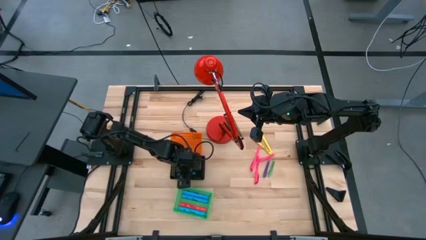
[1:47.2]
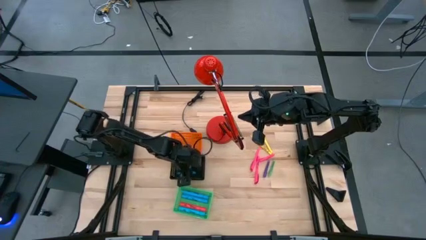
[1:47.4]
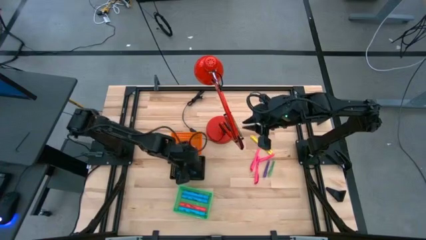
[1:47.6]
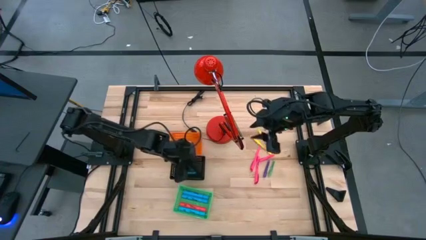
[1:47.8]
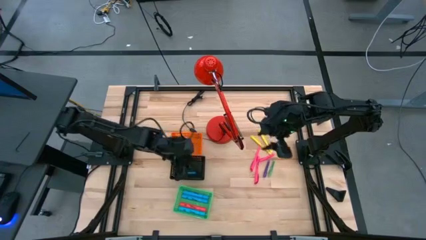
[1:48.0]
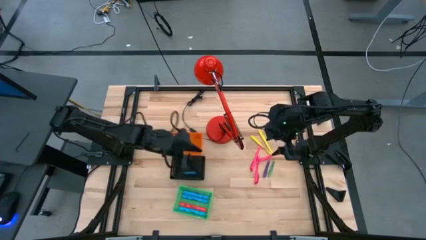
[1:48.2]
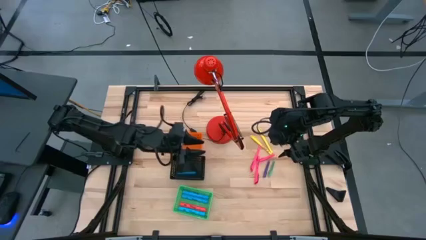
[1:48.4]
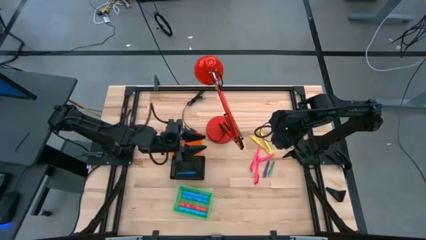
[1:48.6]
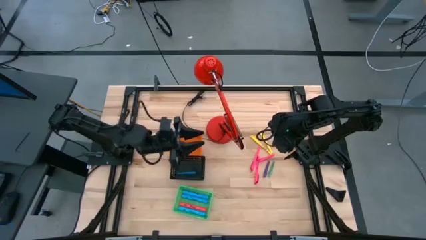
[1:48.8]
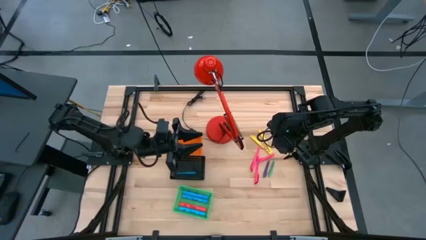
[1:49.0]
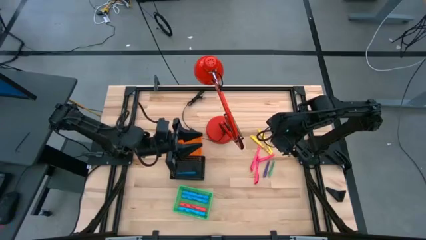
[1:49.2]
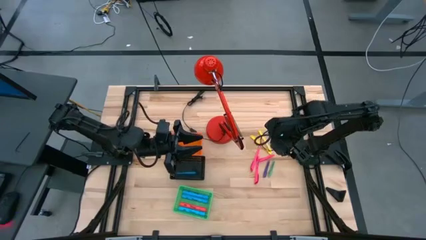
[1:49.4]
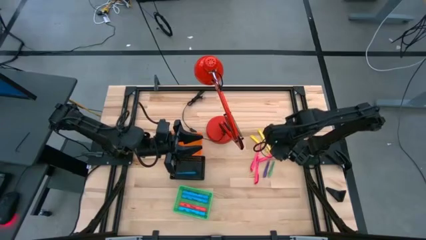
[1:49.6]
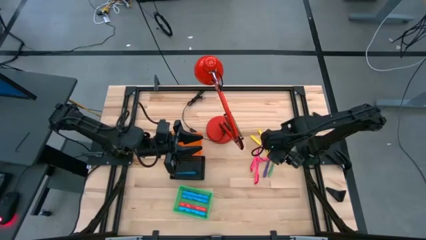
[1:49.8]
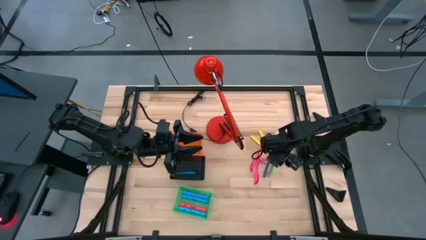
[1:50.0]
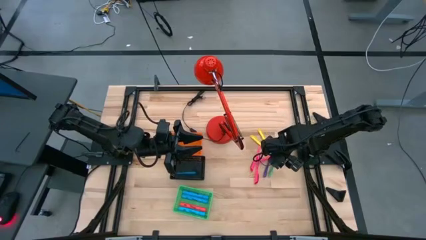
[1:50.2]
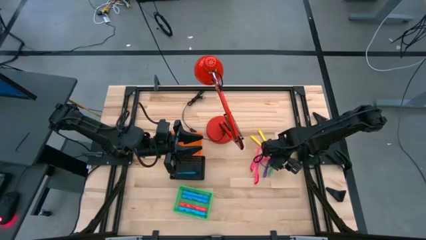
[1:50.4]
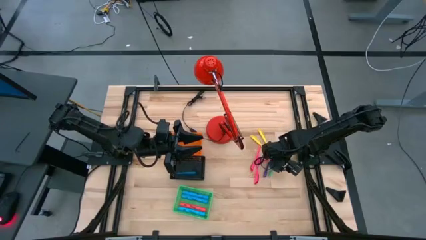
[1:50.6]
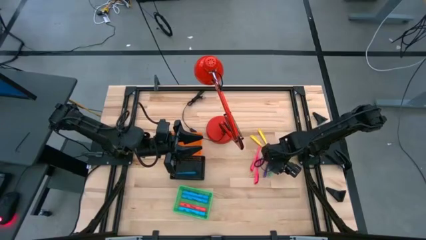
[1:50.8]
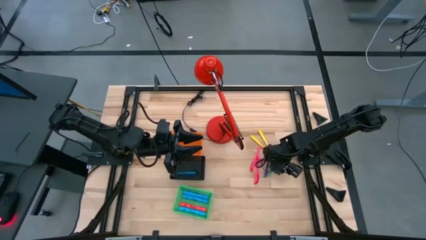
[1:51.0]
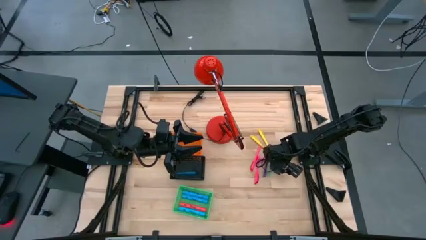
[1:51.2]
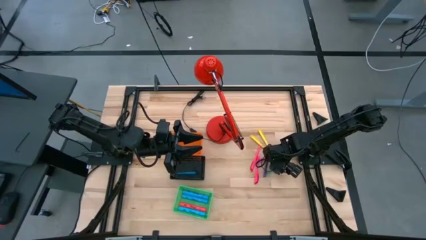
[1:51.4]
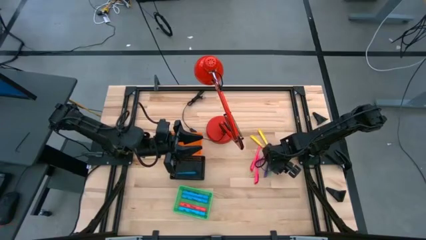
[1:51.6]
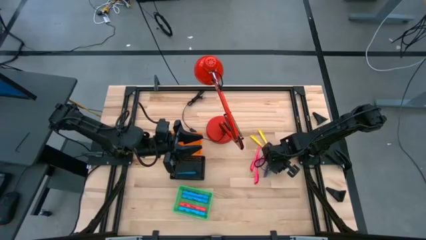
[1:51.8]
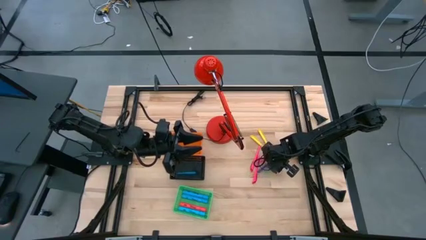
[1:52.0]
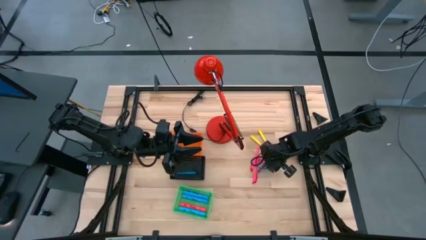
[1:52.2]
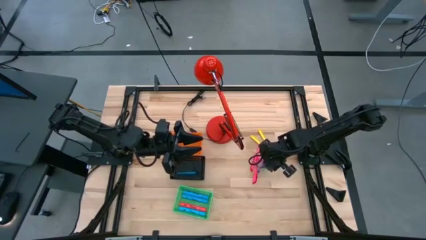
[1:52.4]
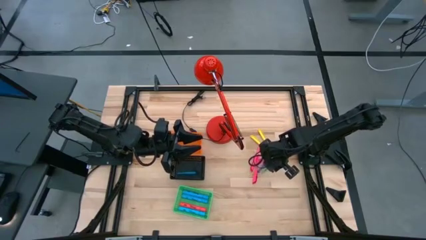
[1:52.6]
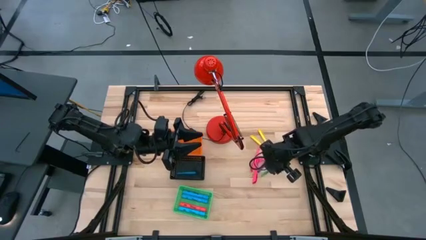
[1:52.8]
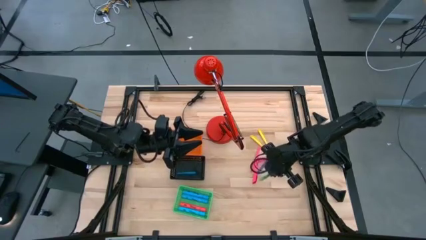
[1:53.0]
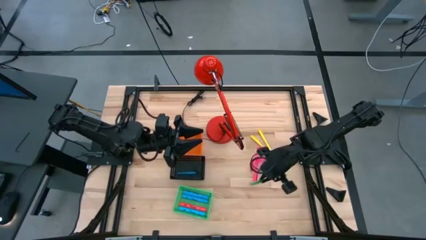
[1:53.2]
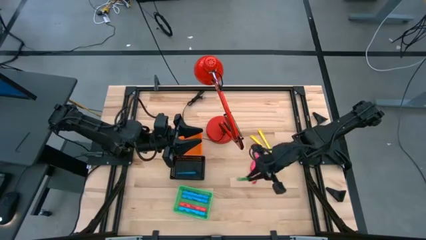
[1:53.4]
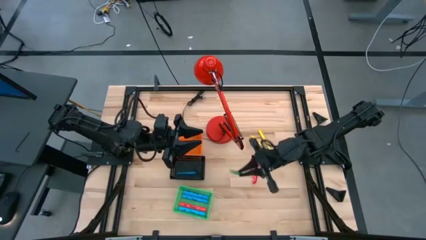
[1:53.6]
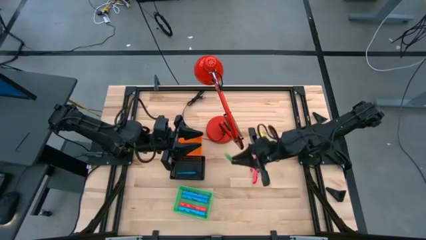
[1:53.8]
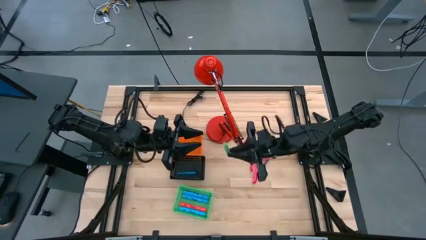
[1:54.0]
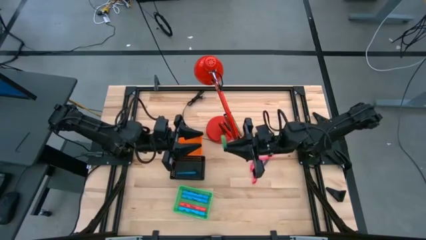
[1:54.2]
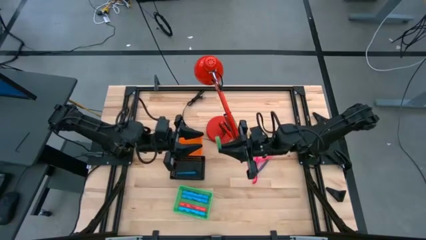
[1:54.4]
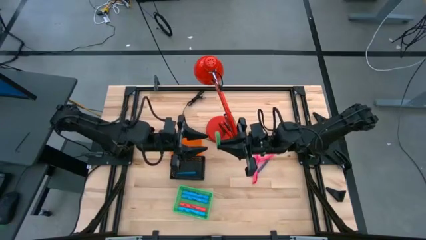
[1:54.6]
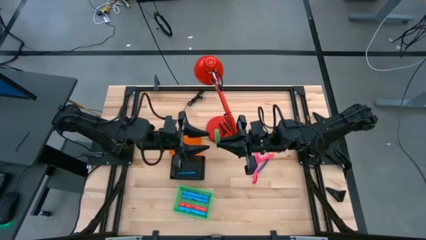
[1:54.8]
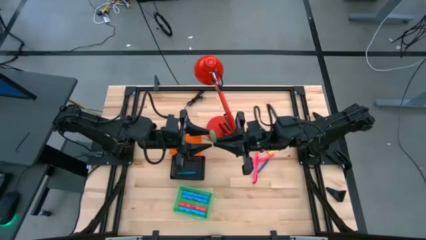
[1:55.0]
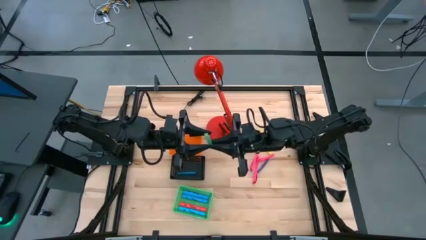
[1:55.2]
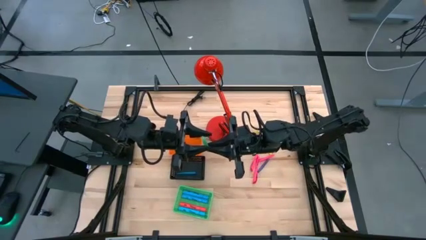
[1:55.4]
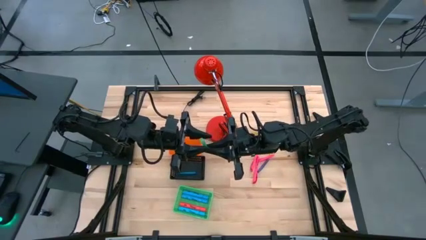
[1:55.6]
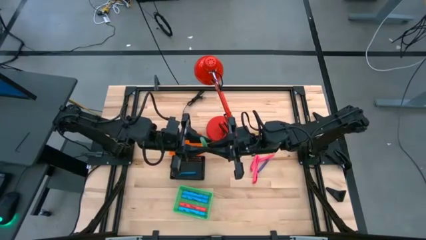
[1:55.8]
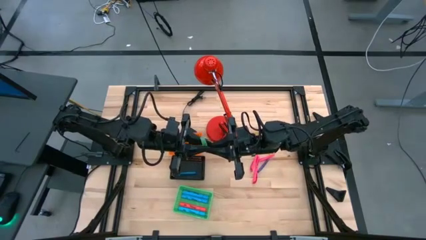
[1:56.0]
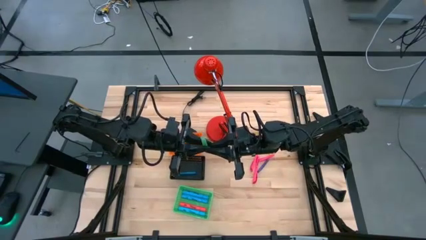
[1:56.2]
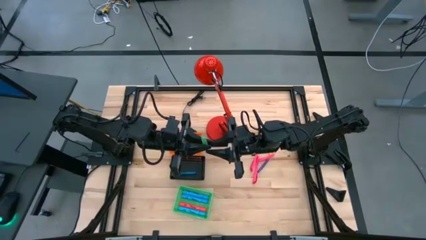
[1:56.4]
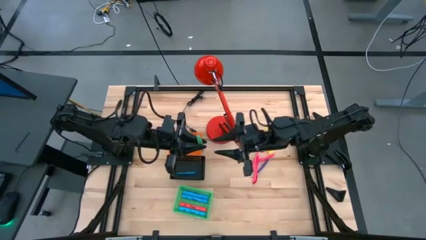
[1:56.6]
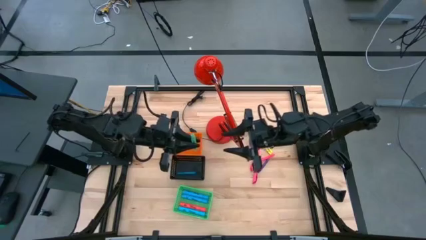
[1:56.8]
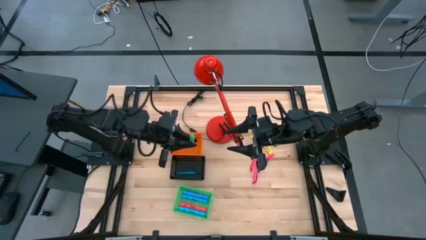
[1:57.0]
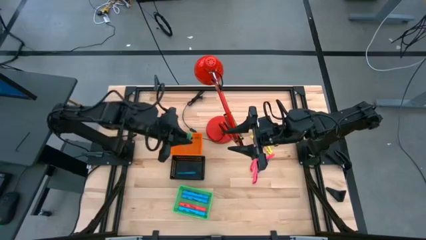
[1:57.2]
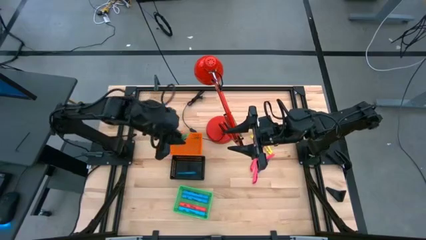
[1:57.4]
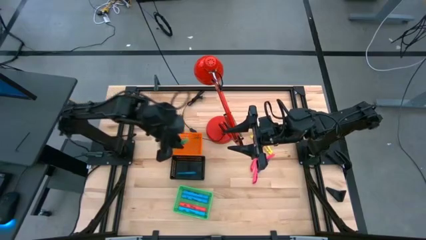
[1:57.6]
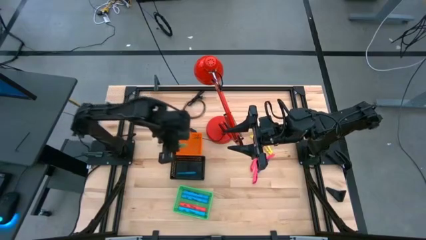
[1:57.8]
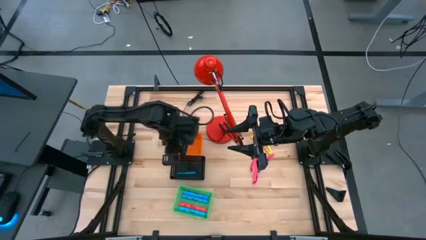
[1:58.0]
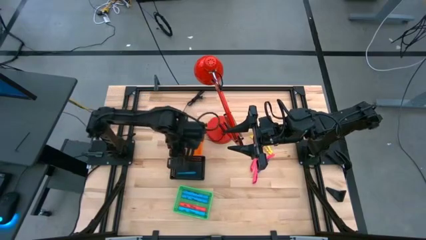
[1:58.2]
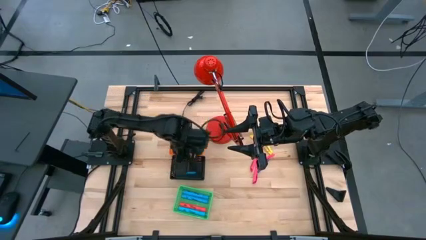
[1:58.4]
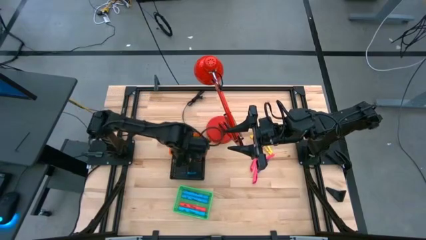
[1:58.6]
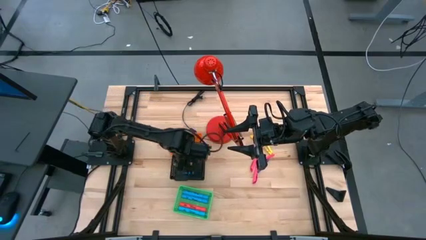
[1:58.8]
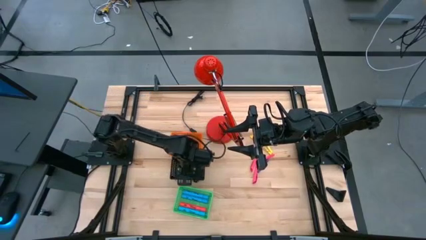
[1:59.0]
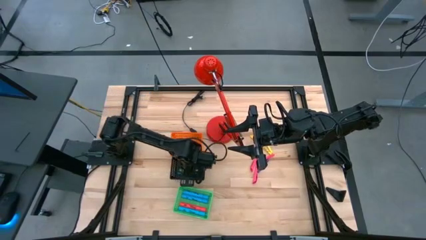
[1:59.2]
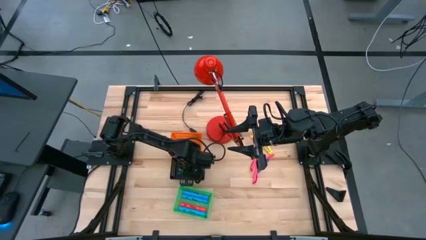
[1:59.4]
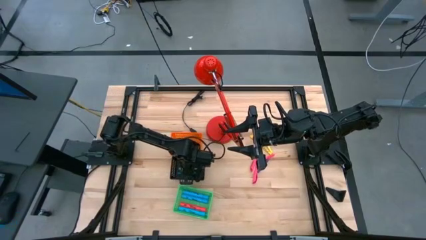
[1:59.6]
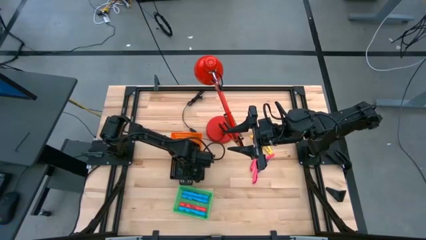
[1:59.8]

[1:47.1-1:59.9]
Task: Pick & Place Markers
Put the green pen into the black bin
